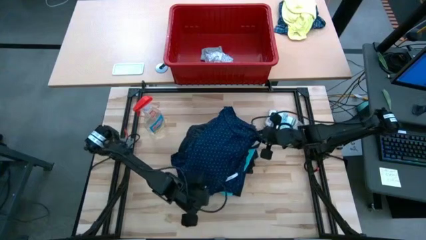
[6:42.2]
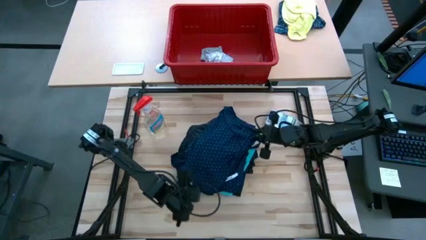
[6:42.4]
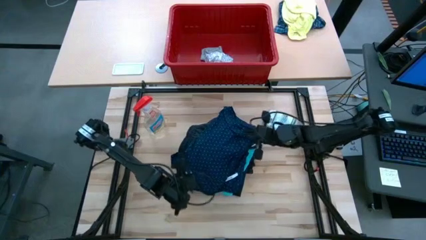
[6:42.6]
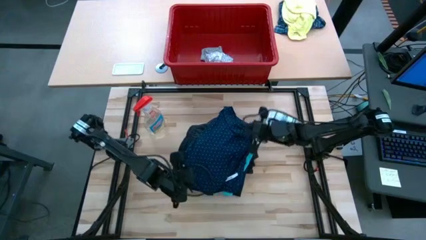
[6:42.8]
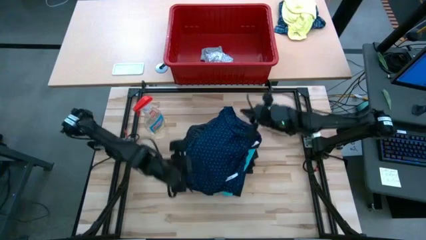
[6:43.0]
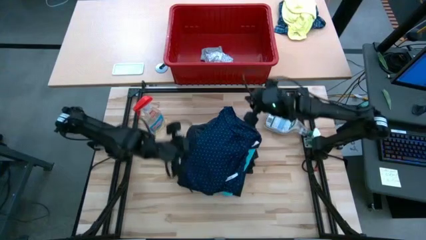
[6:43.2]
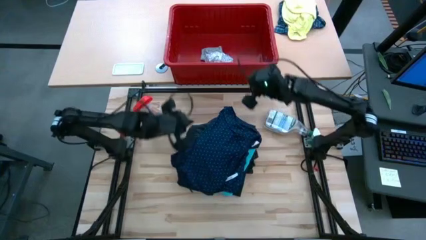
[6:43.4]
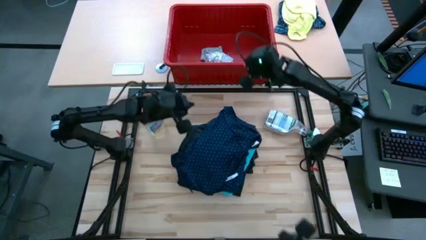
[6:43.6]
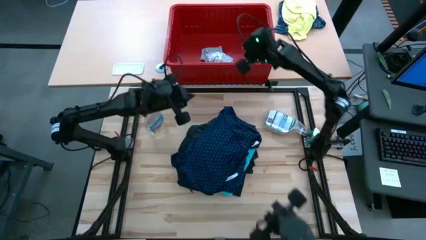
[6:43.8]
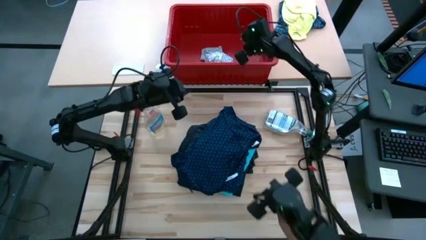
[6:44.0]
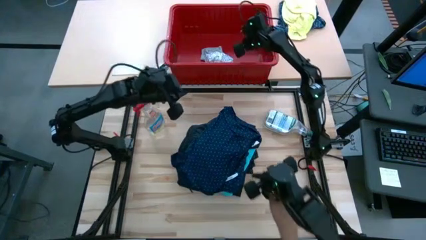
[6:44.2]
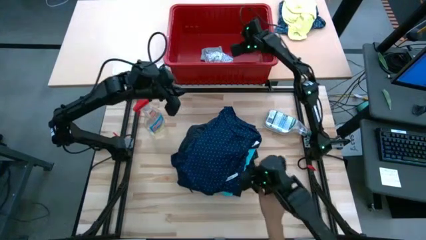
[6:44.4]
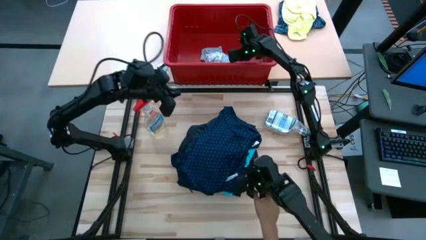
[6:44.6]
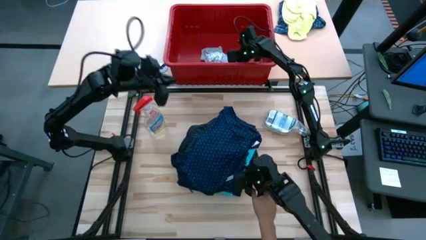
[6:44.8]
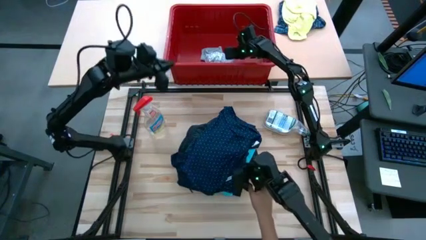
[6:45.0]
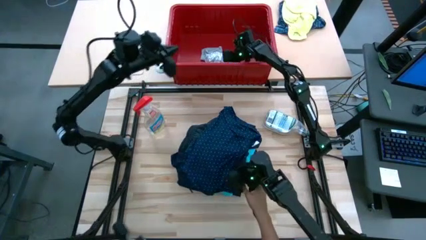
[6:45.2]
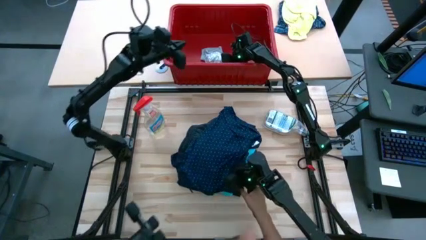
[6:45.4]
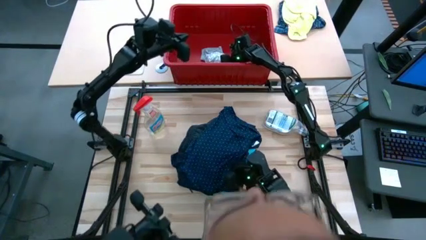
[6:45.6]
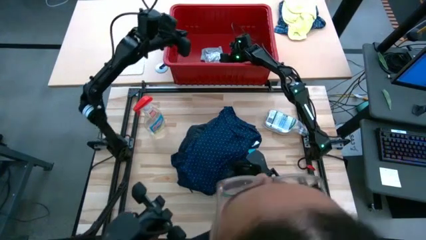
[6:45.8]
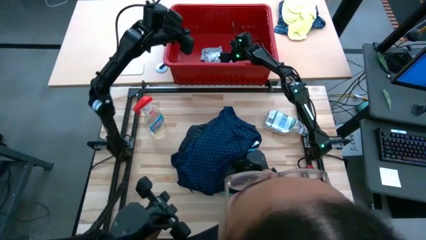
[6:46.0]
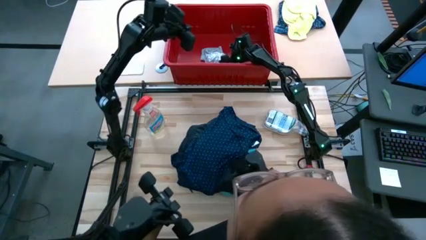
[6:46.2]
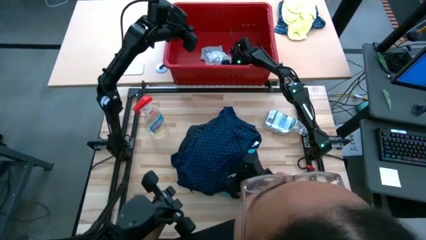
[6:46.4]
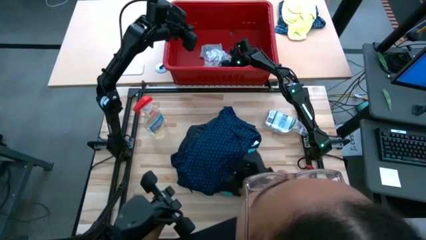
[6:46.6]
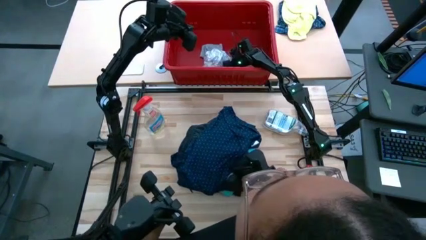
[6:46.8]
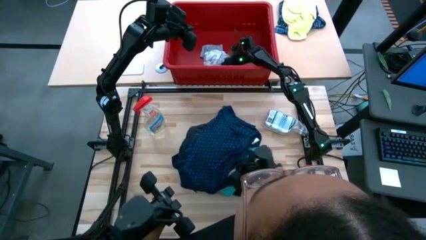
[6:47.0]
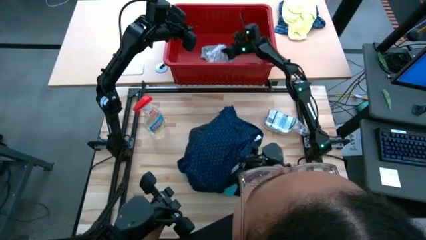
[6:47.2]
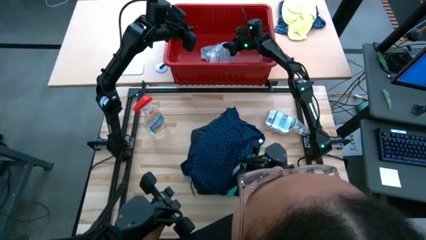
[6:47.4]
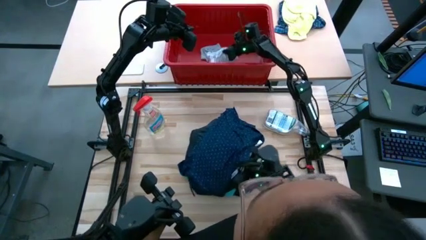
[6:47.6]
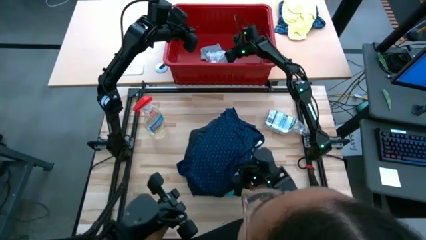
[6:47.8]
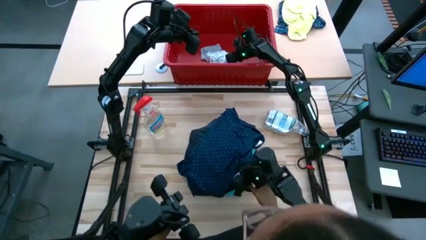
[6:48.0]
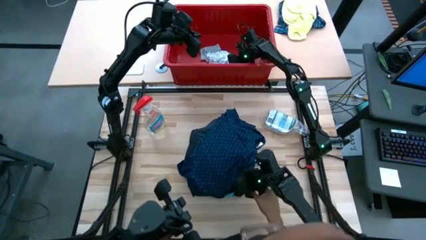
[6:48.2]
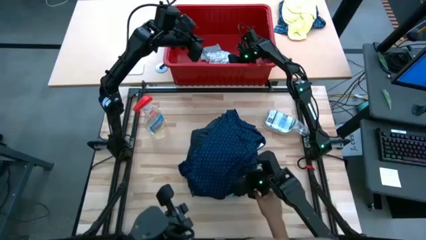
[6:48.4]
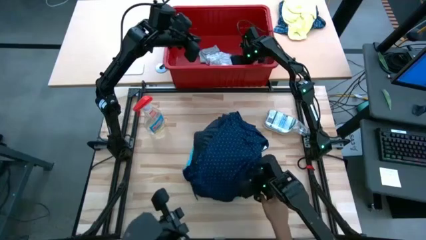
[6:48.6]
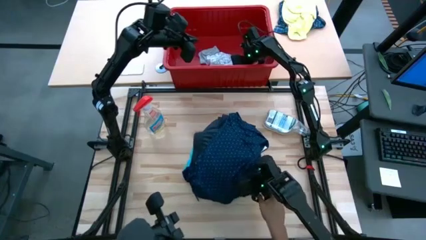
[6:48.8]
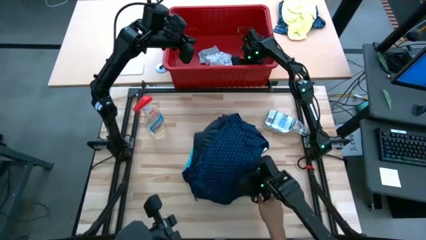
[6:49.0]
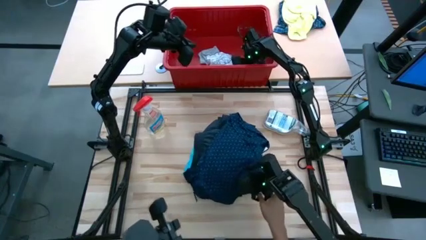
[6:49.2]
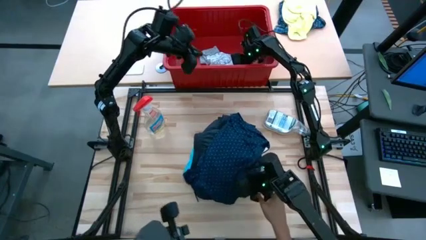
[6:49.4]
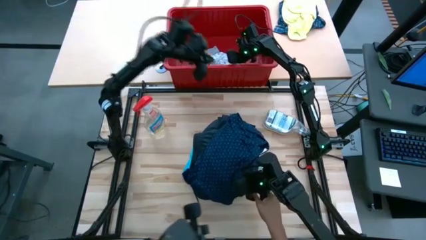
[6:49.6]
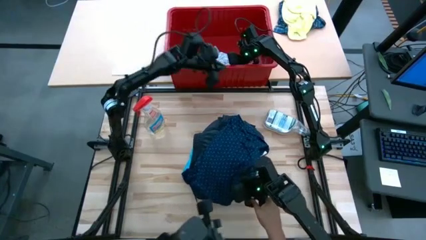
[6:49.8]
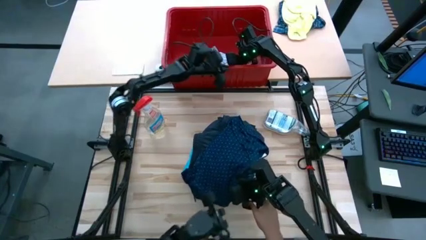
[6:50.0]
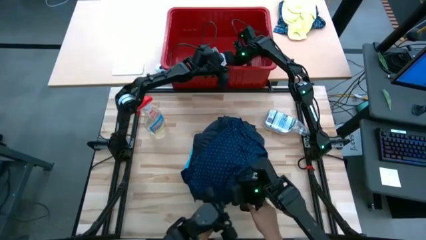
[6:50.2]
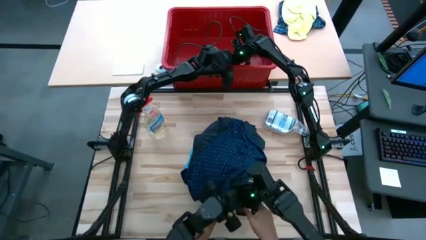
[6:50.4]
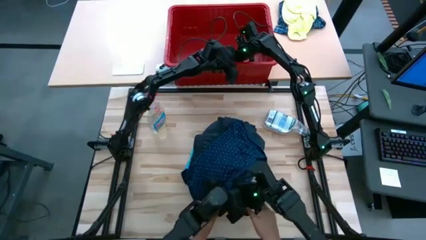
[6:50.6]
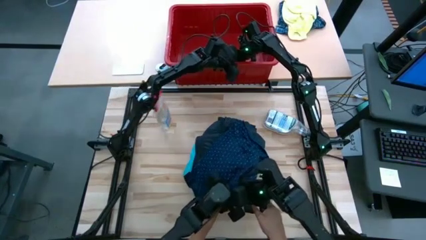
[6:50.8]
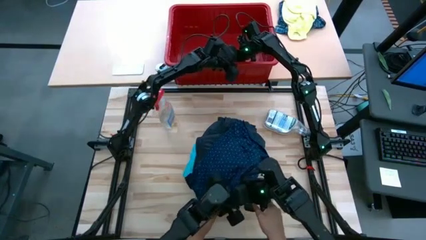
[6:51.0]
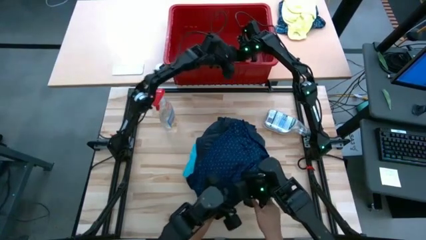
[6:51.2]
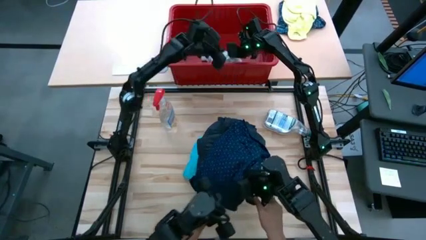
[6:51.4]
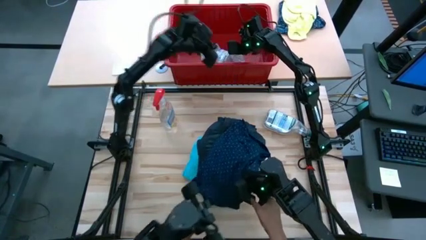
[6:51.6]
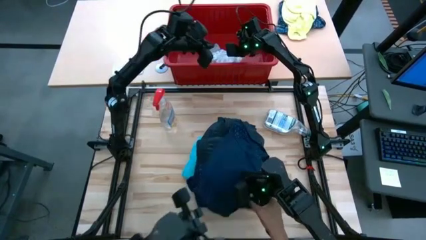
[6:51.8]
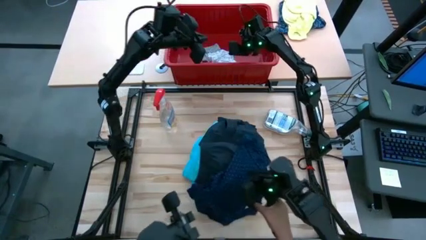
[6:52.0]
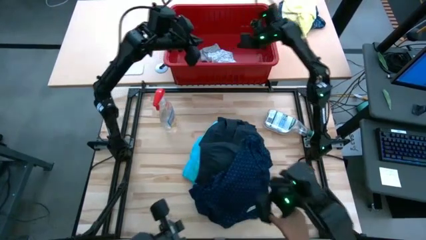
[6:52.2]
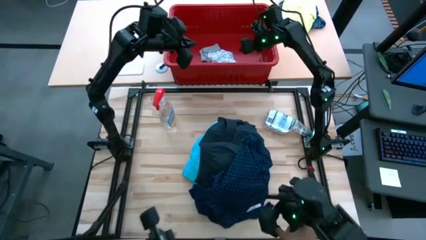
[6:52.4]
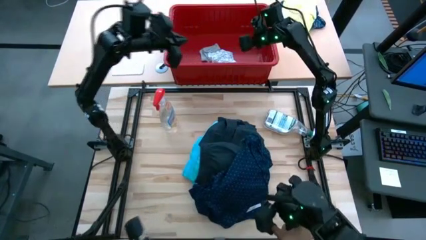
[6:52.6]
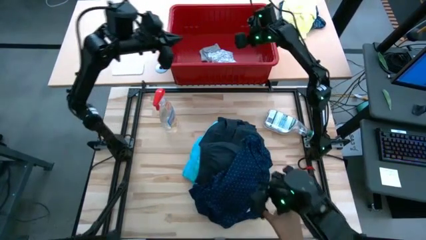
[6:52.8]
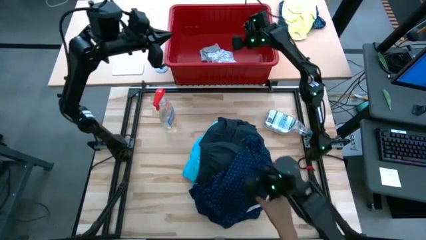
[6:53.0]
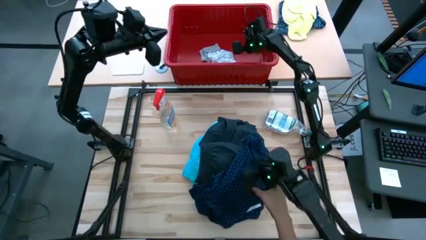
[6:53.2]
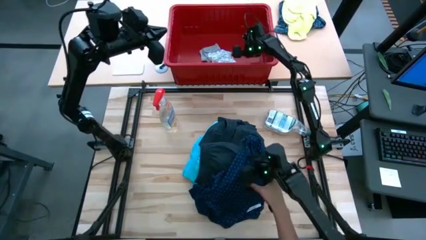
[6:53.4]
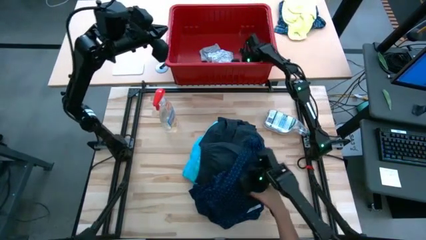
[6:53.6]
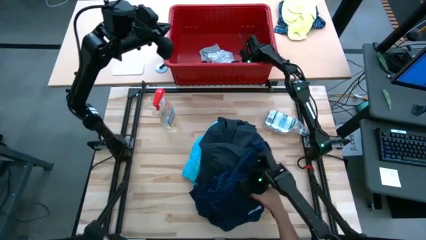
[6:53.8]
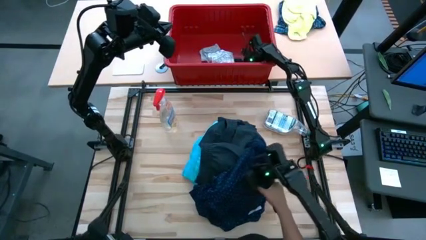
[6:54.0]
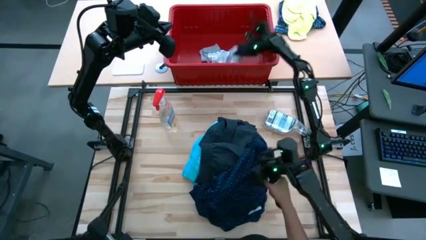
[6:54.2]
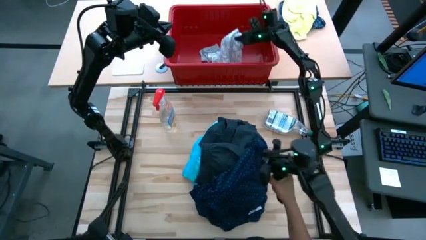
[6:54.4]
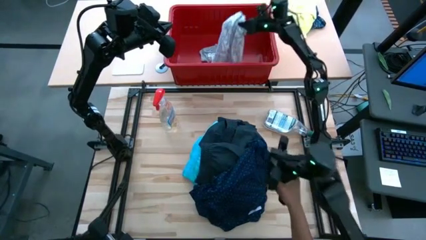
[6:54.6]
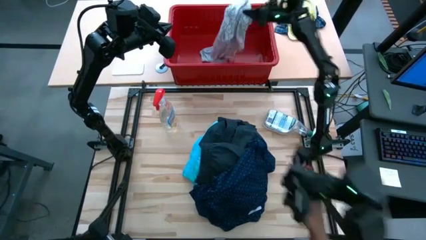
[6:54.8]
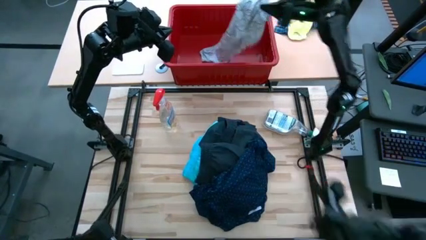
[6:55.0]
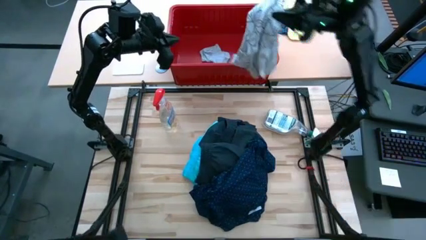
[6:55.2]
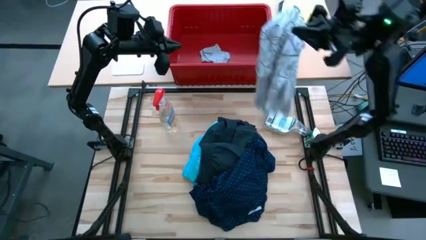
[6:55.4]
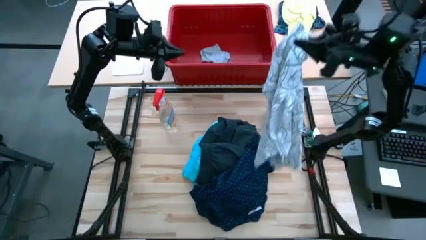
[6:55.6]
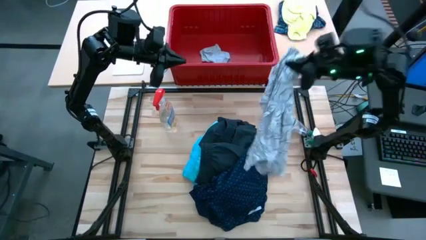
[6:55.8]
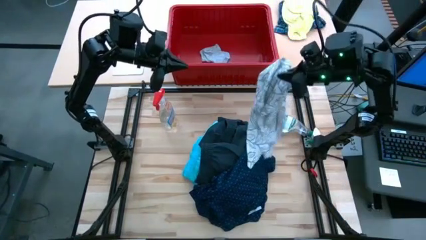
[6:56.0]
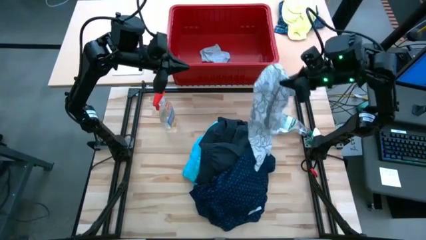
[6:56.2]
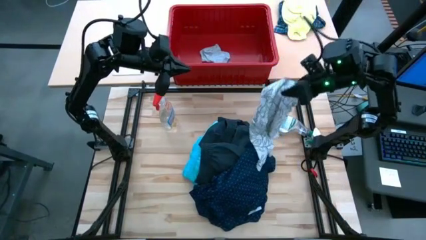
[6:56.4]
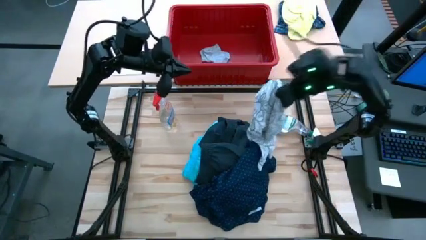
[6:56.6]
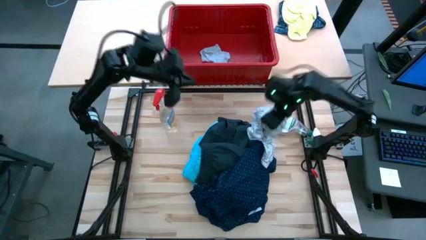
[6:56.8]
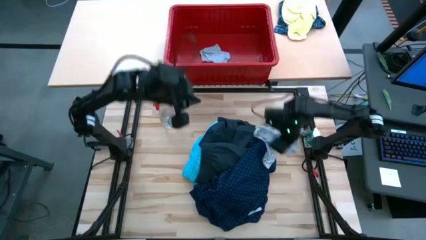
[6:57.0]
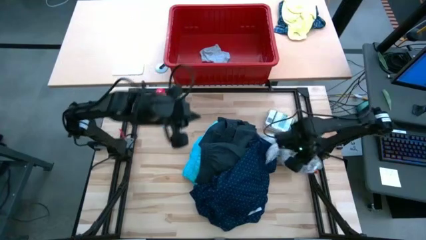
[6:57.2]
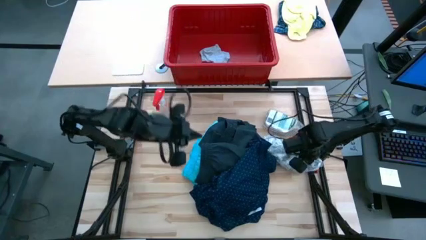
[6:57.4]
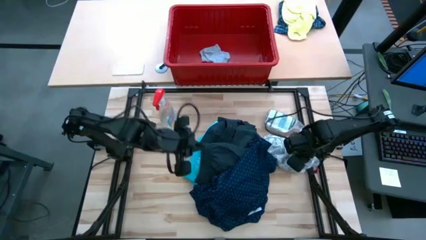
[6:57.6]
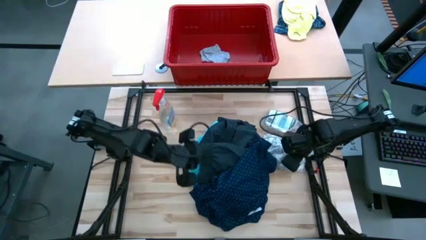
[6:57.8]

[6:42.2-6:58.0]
Task: Fold Laundry from Bin
Fold the white floral shirt
